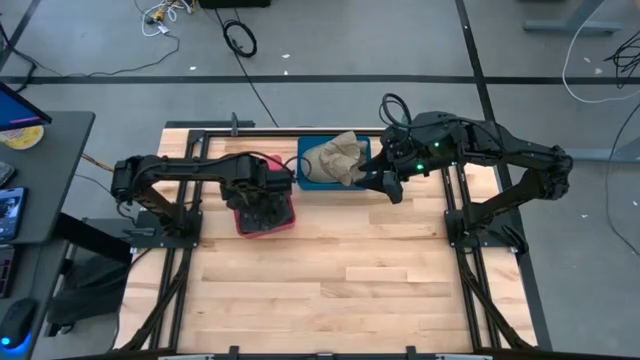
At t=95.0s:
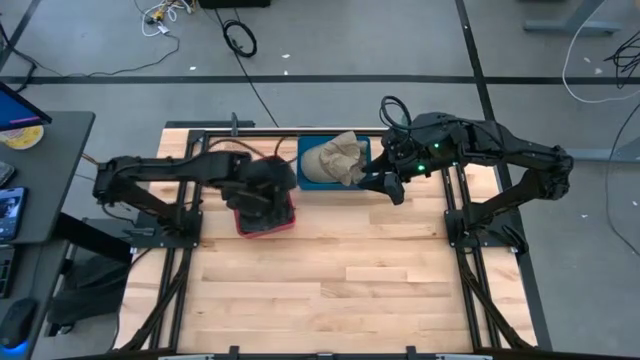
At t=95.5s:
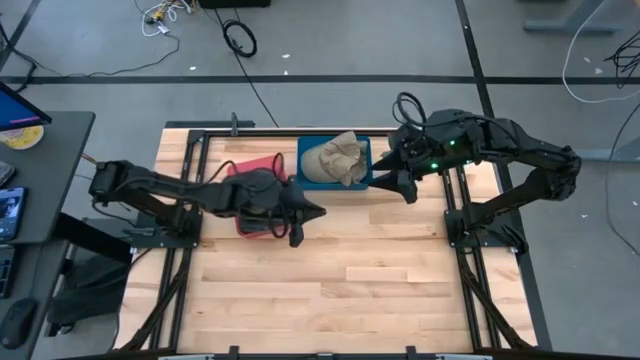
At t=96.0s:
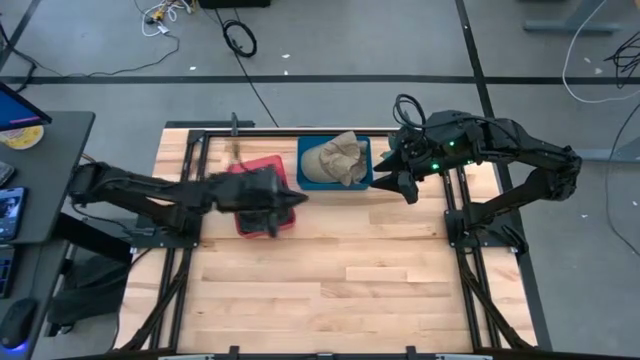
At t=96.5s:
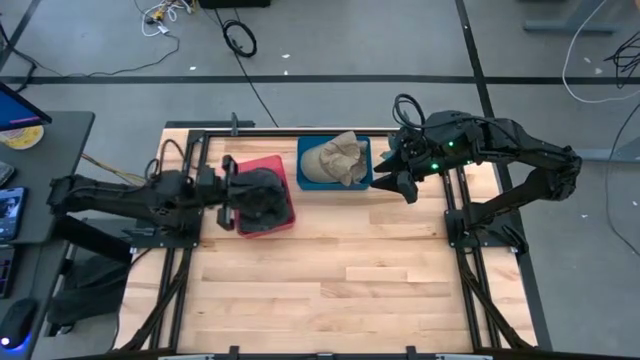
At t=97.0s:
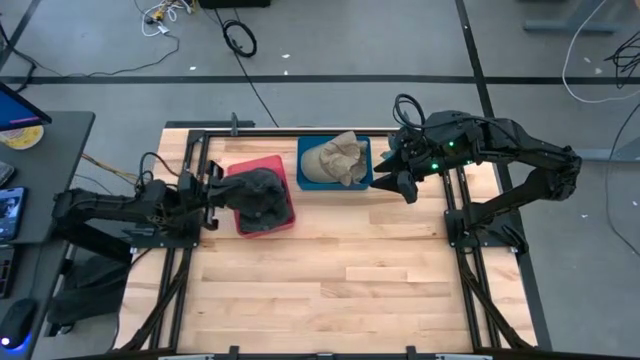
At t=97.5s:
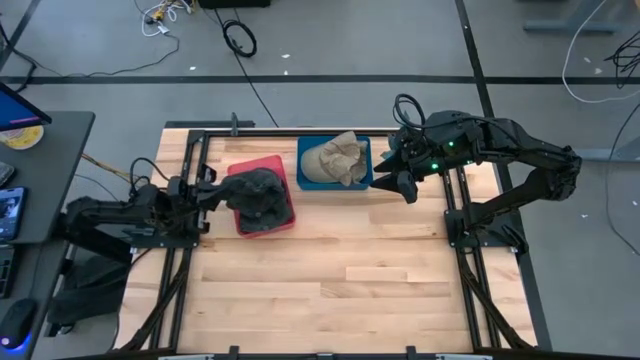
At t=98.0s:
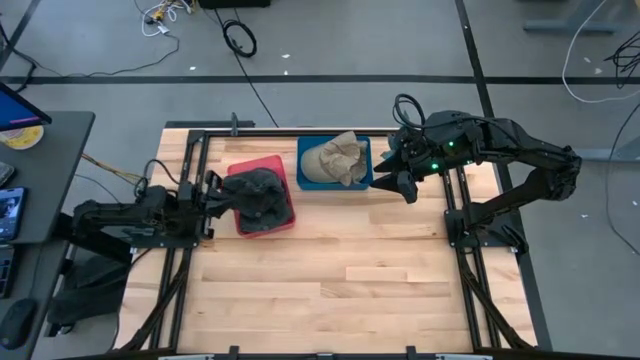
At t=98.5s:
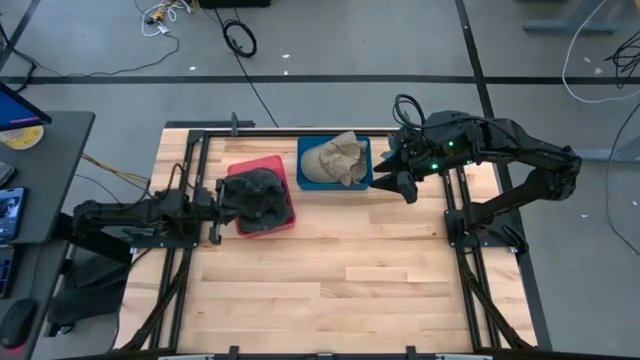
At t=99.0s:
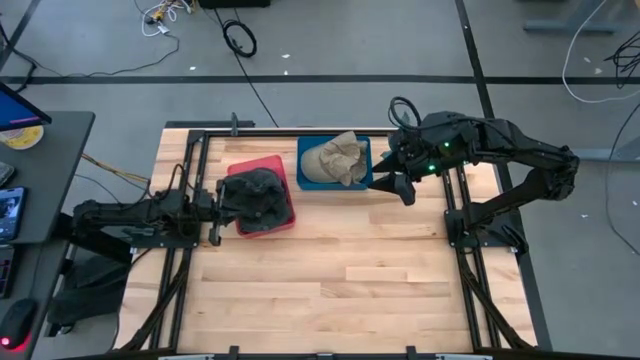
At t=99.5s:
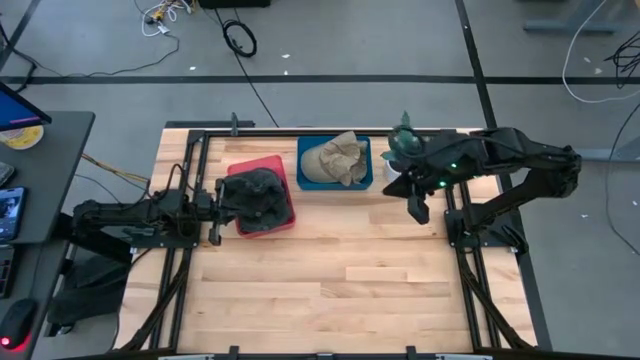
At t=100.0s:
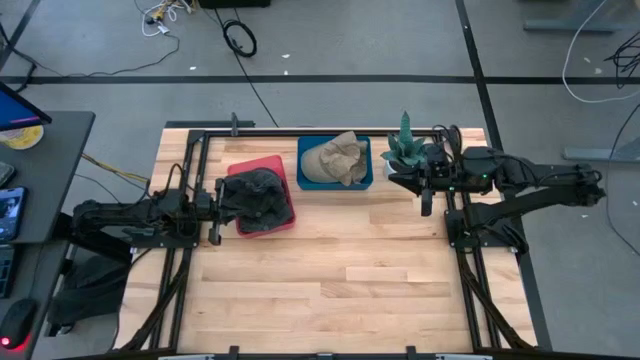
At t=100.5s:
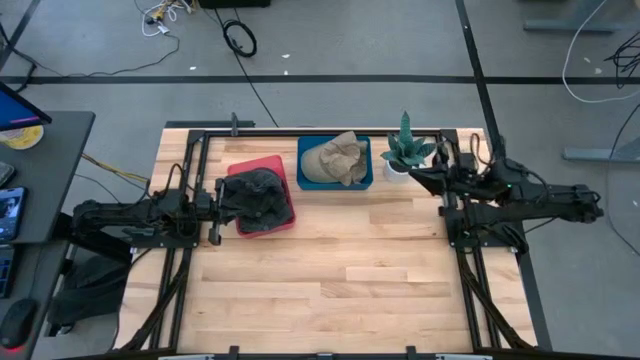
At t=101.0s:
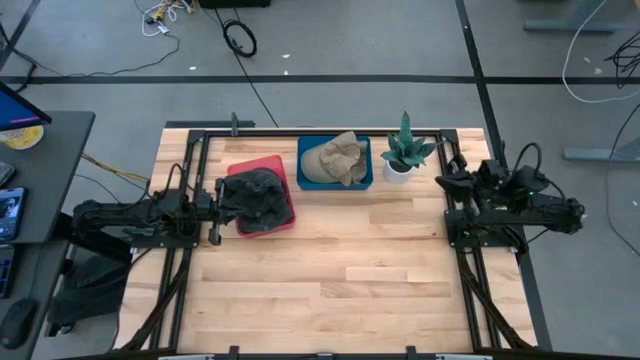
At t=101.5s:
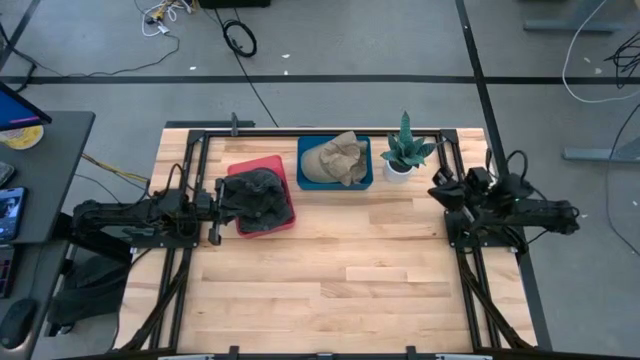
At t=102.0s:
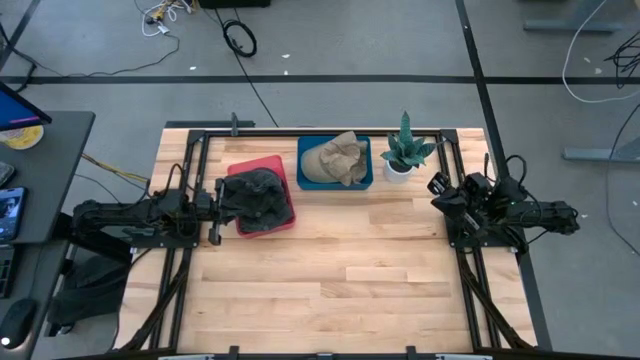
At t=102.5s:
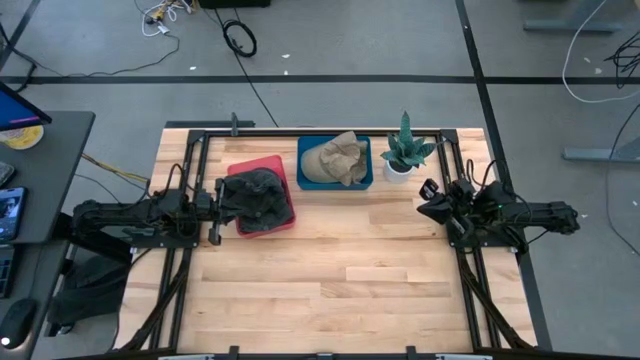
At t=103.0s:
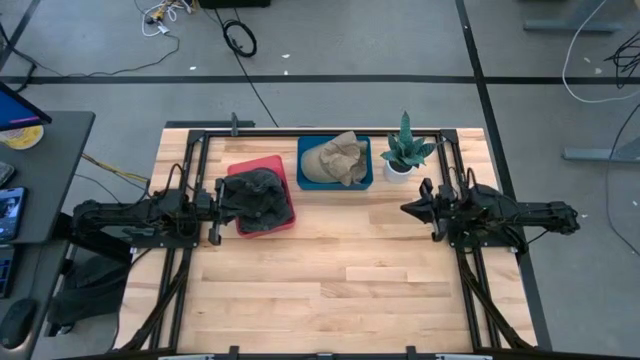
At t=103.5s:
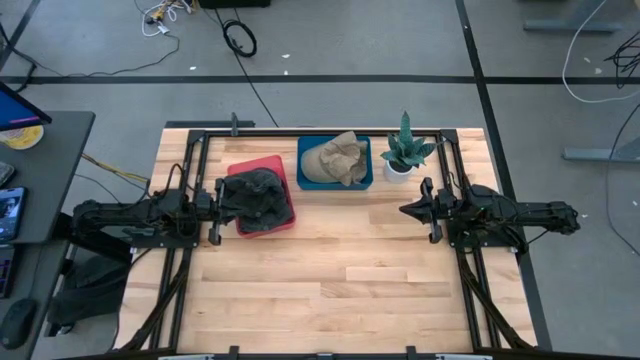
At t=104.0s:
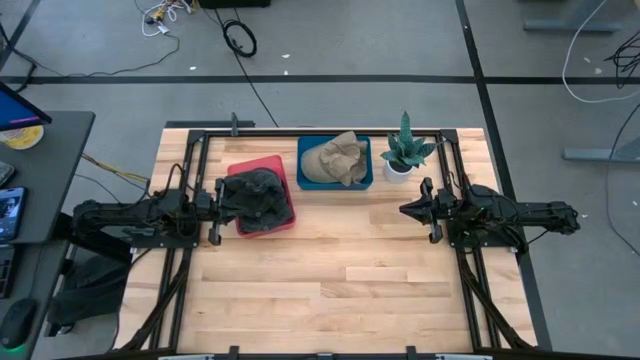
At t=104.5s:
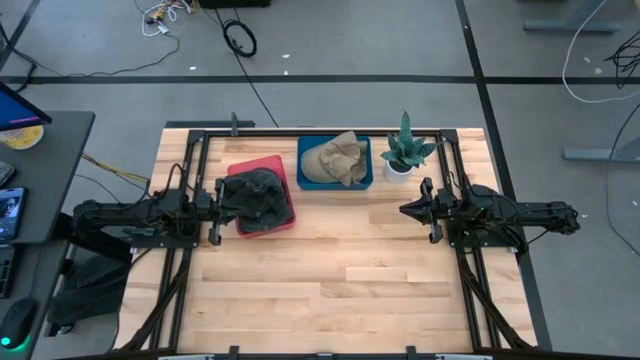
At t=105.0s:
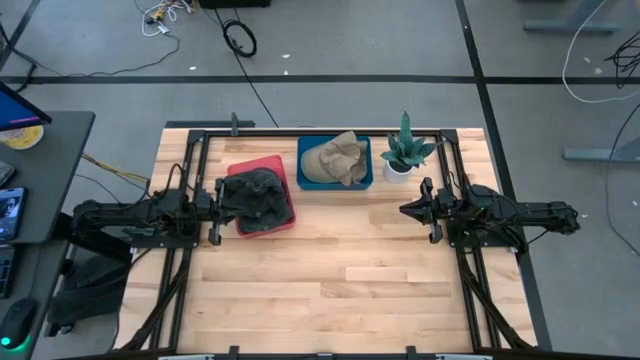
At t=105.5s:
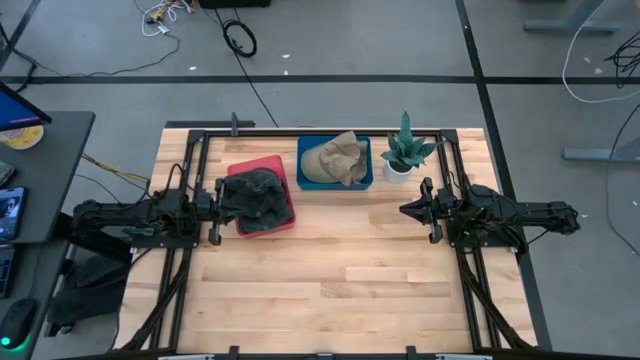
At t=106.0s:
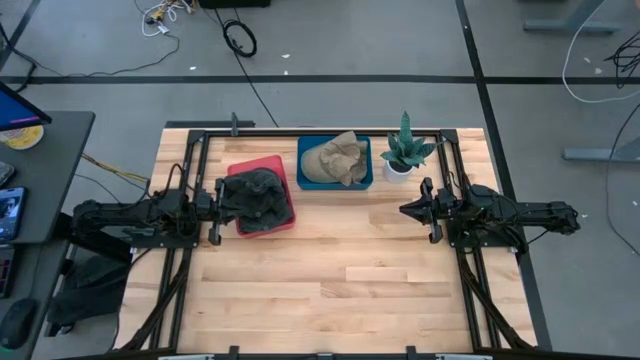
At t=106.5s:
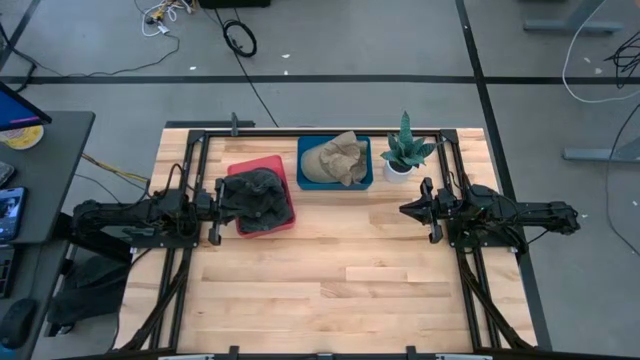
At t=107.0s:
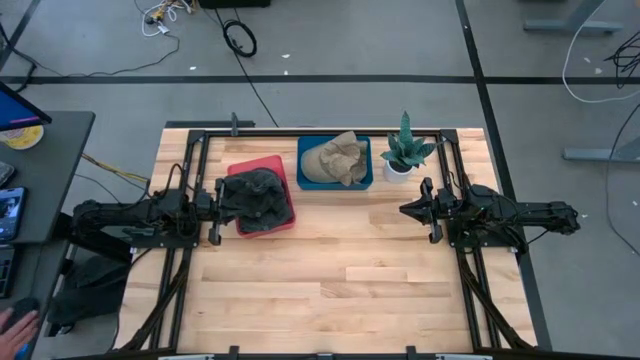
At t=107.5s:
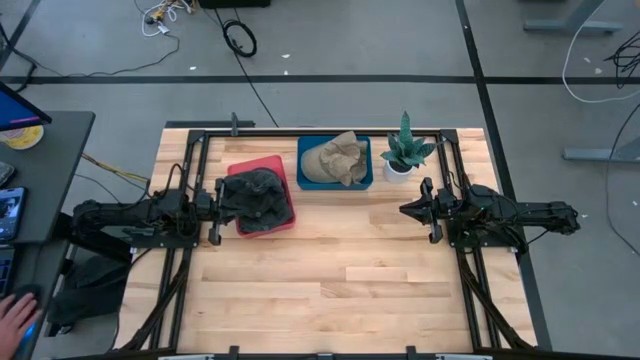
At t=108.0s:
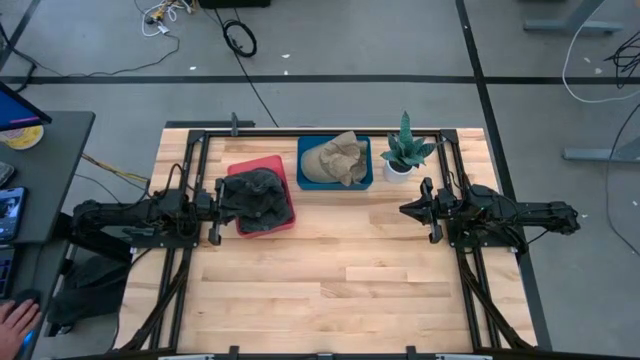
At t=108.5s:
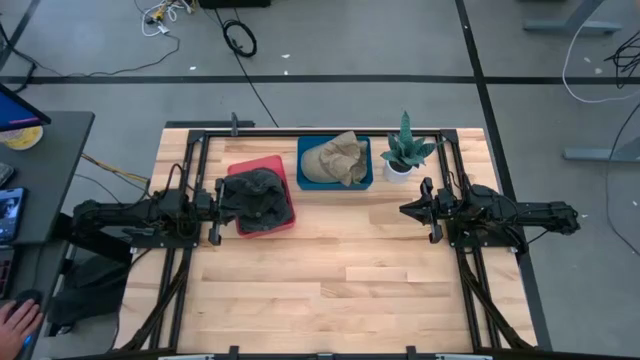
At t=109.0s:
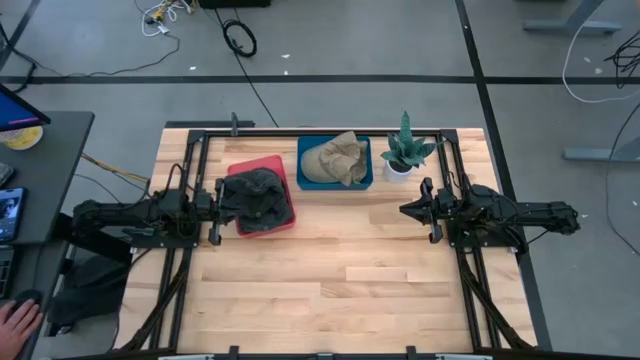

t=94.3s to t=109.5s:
Task: Pick & Place hat
Return to Home Position

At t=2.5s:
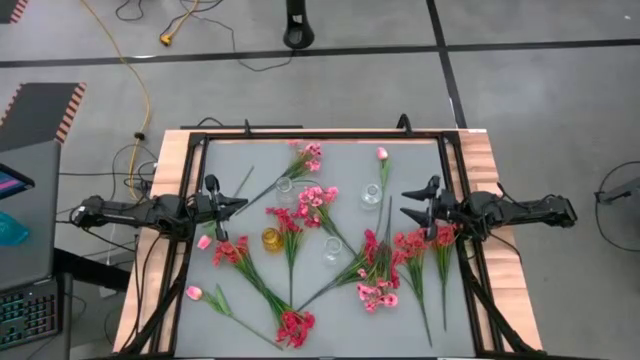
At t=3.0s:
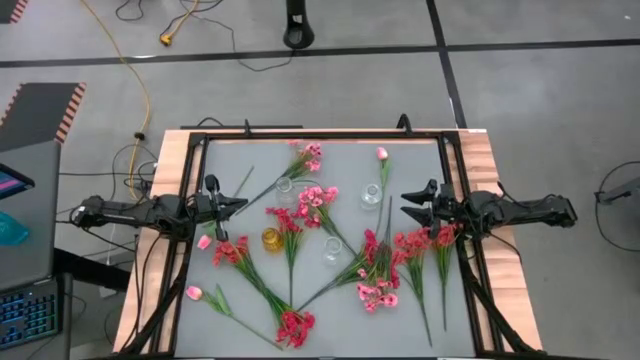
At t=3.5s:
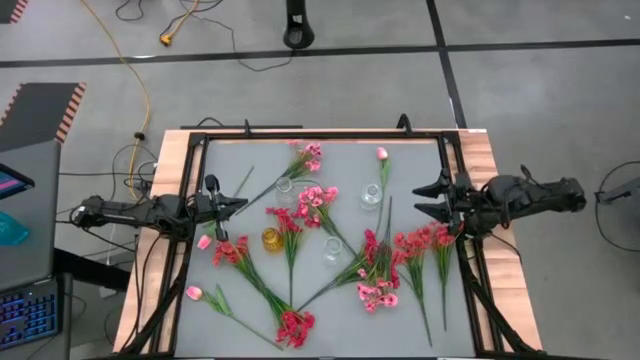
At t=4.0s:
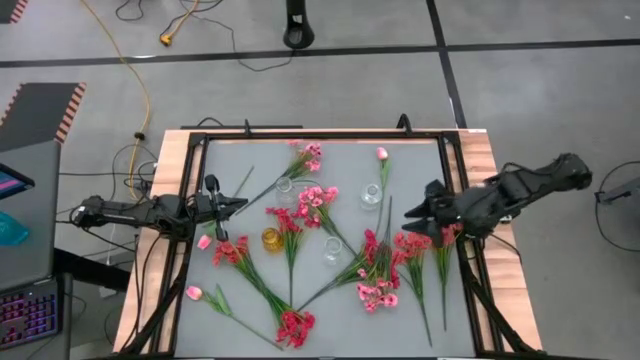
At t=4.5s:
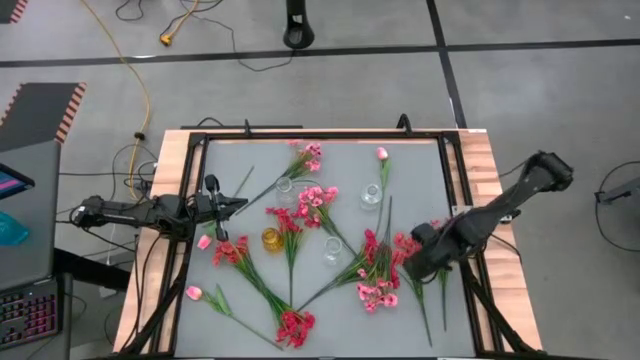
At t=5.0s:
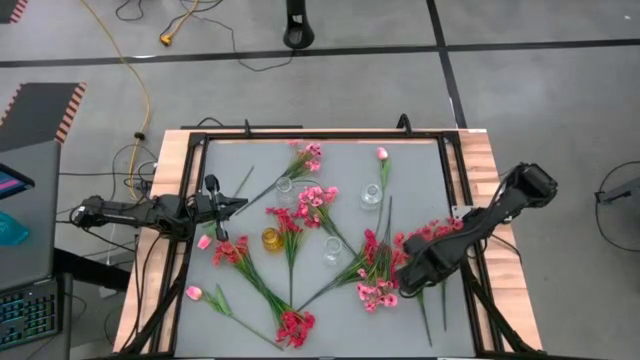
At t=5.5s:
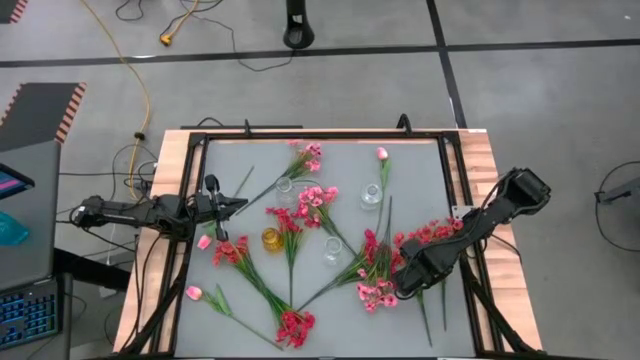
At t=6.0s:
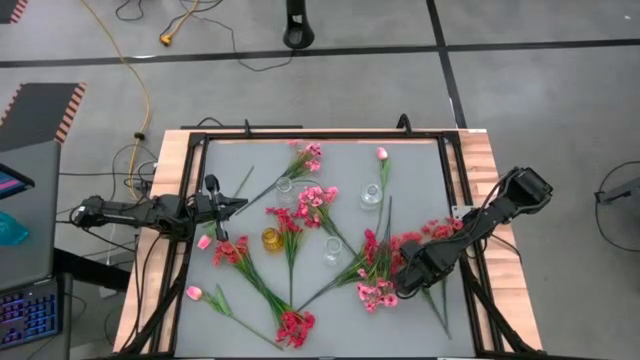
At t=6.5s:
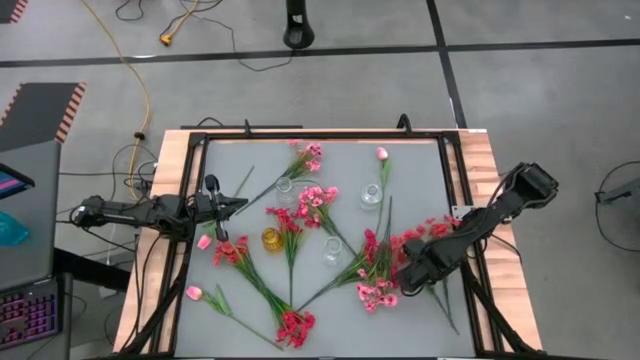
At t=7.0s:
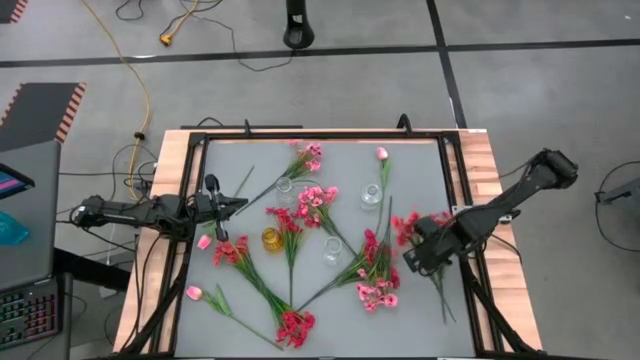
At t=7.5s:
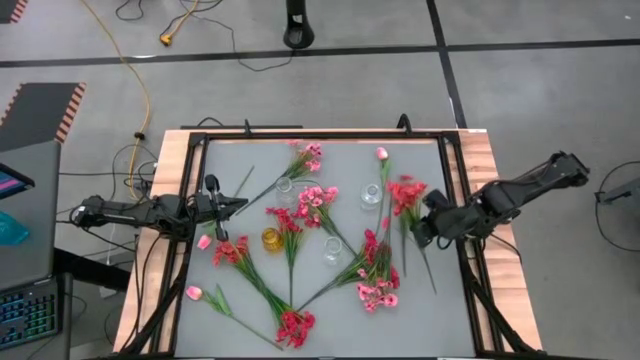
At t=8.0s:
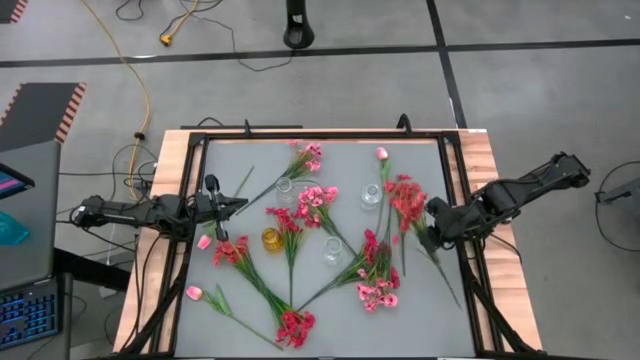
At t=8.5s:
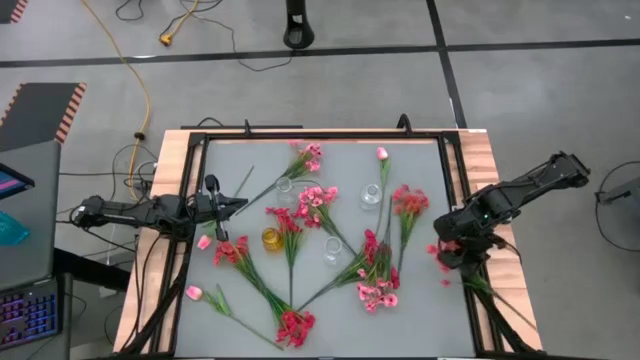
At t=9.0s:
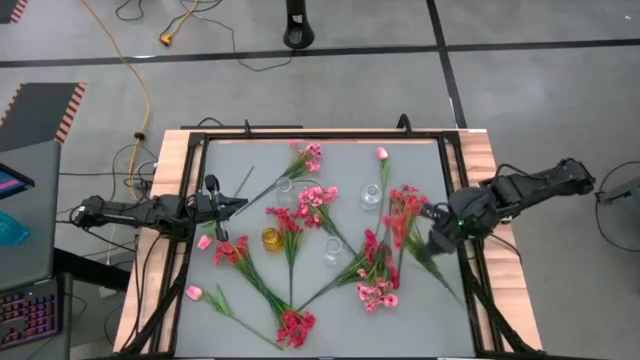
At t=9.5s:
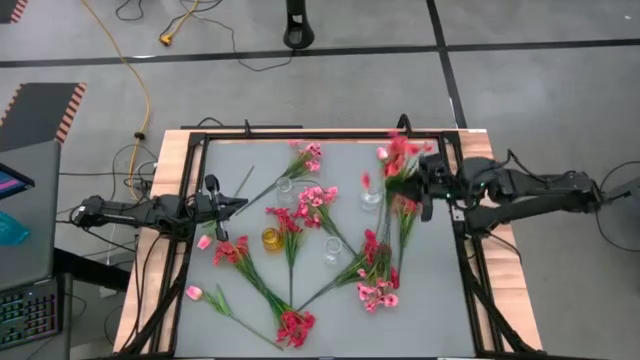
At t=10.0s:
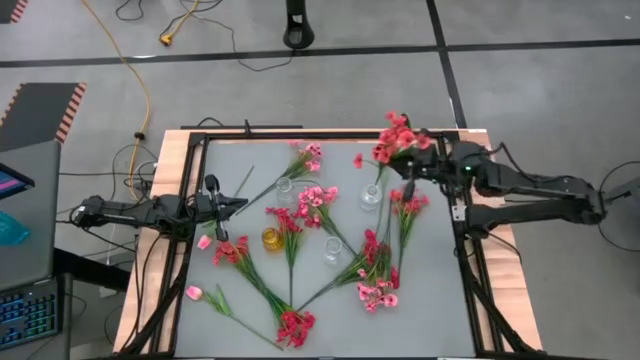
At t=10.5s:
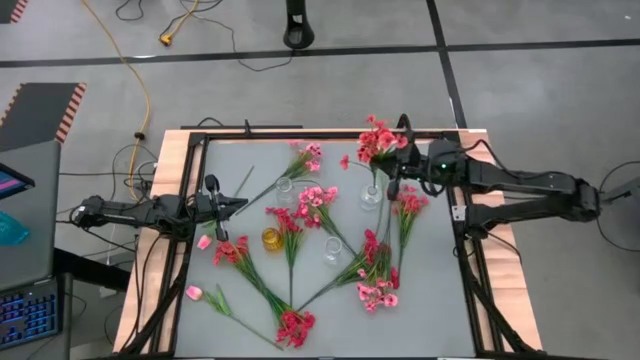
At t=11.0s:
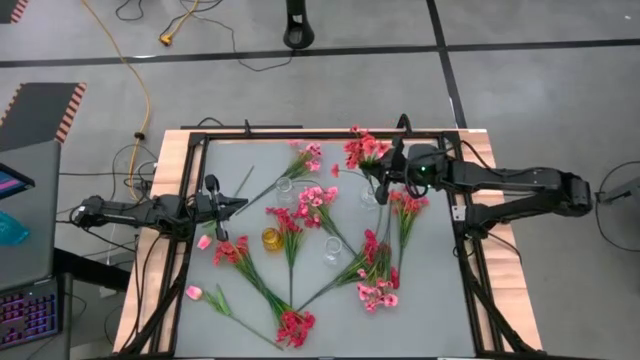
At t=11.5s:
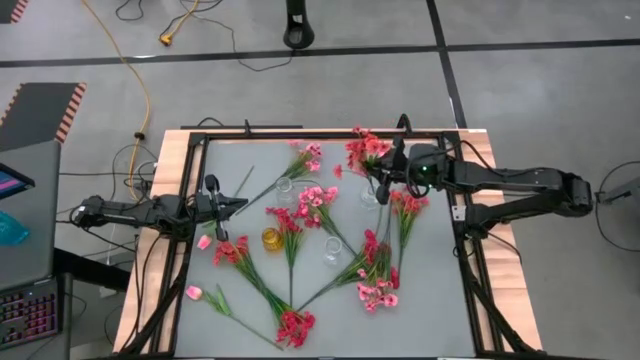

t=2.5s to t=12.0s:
Task: Sort flowers into vase by color
Put the center orange flowers into the top right transparent vase
